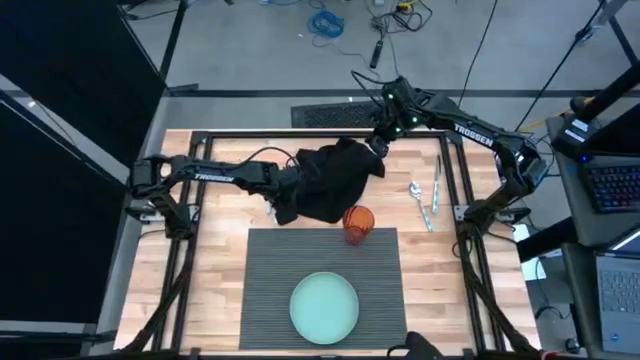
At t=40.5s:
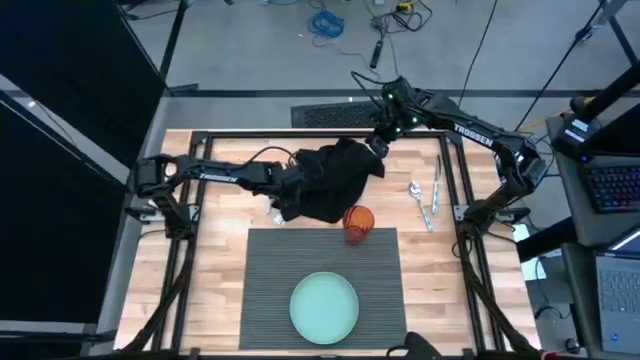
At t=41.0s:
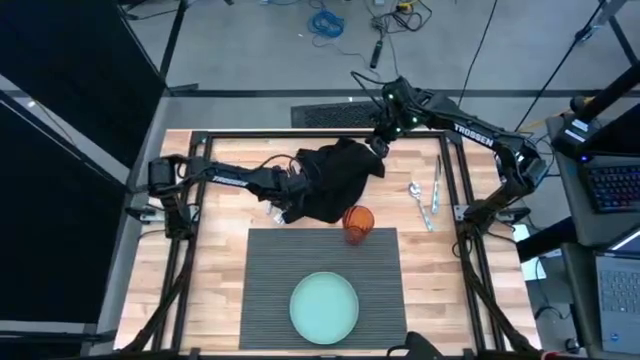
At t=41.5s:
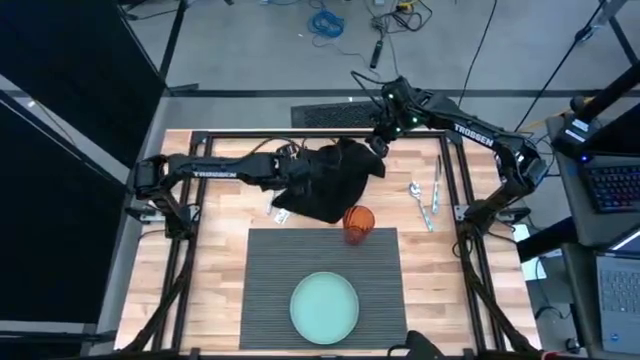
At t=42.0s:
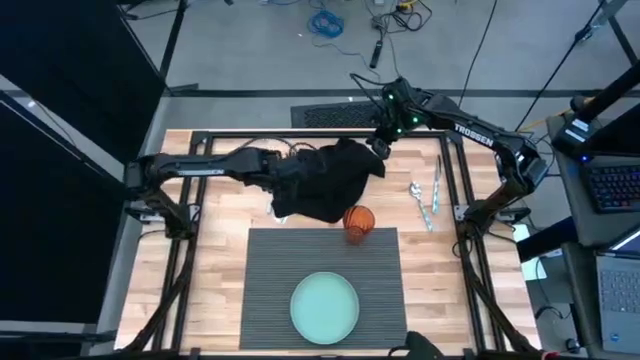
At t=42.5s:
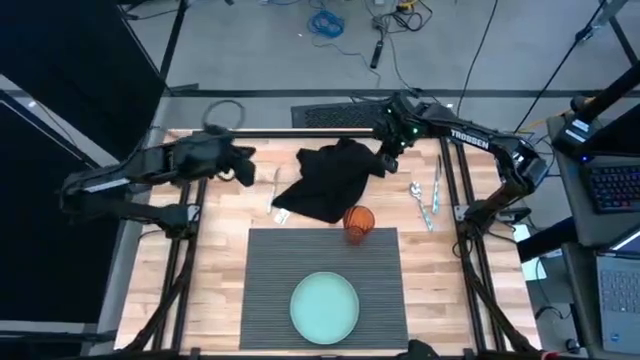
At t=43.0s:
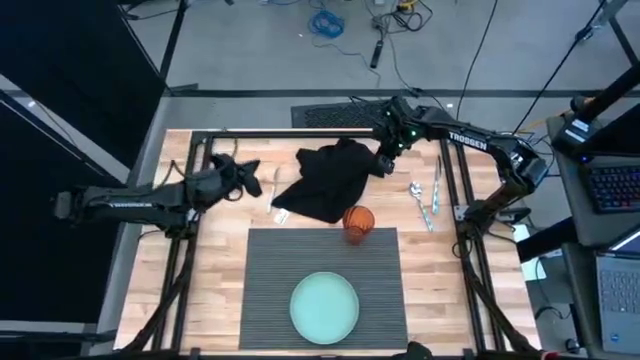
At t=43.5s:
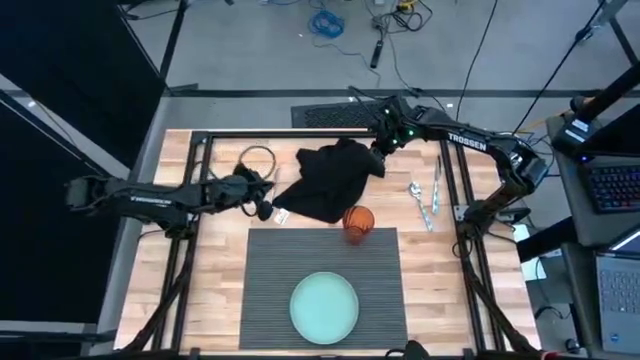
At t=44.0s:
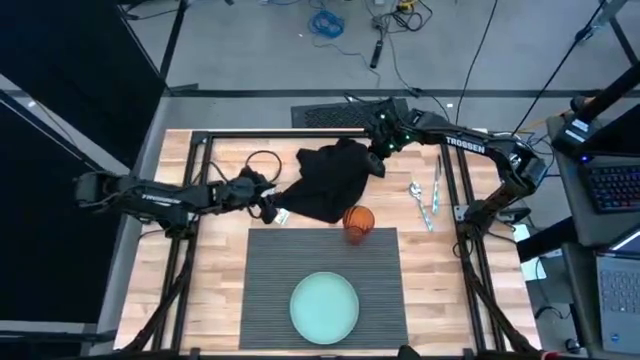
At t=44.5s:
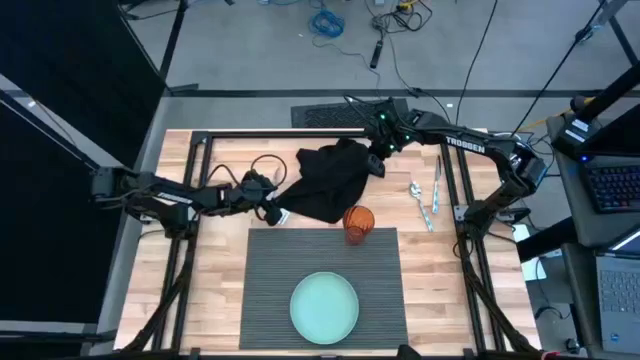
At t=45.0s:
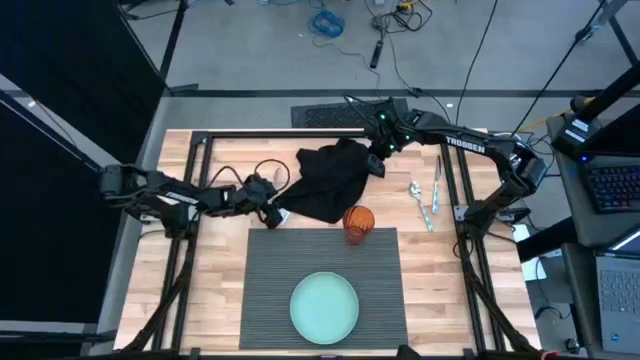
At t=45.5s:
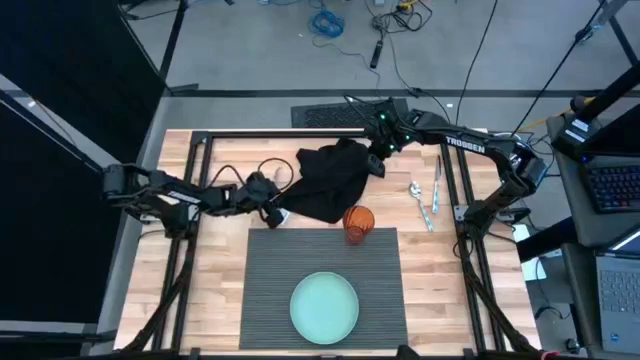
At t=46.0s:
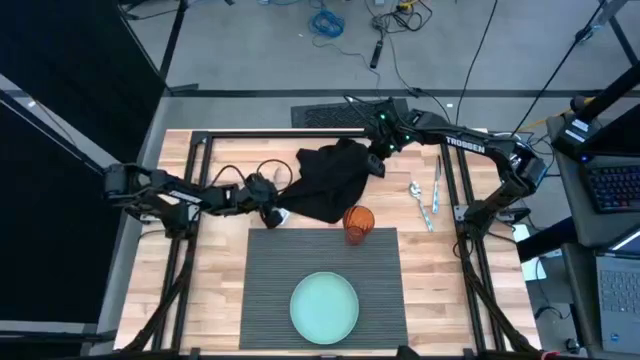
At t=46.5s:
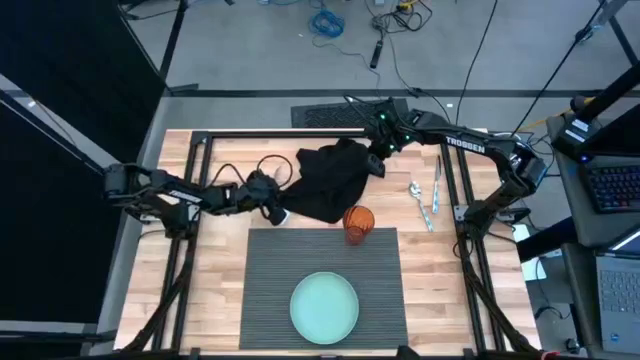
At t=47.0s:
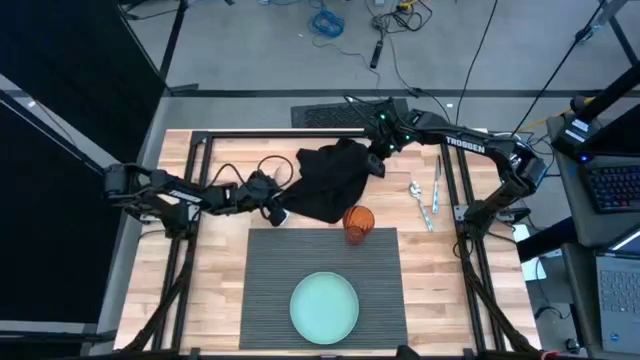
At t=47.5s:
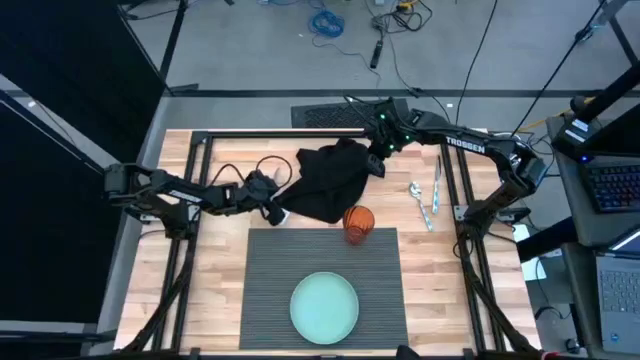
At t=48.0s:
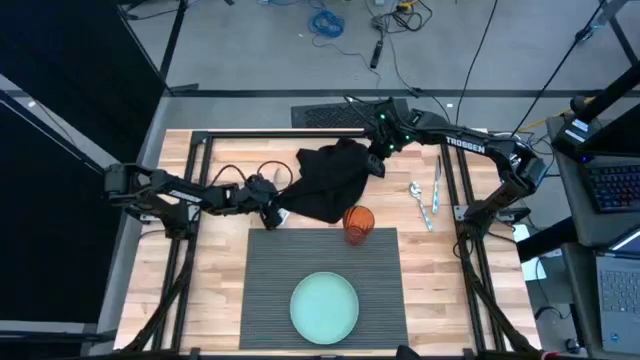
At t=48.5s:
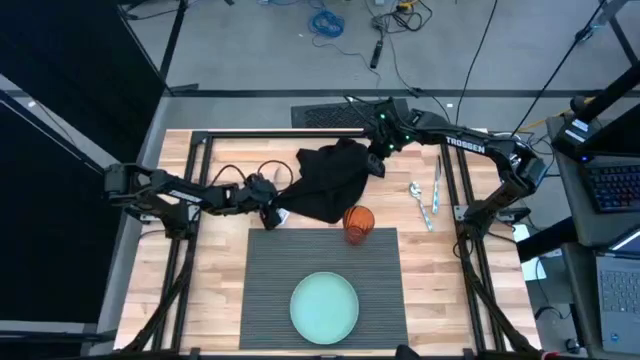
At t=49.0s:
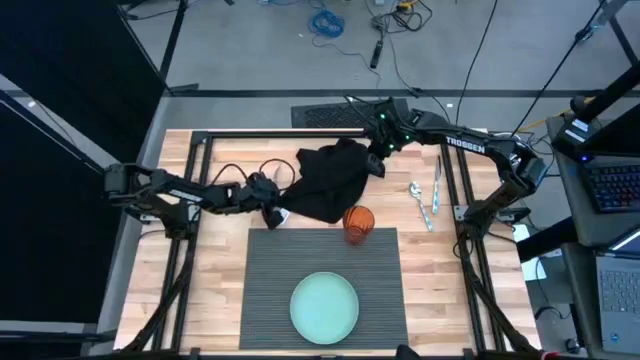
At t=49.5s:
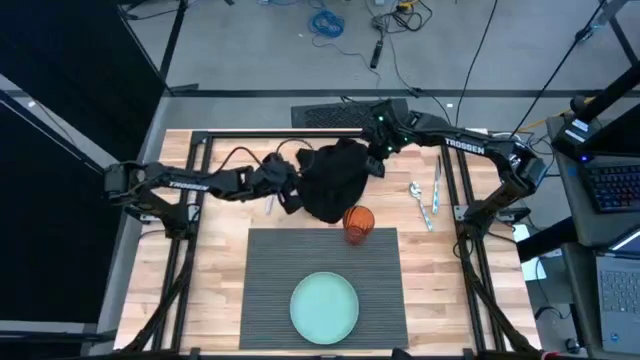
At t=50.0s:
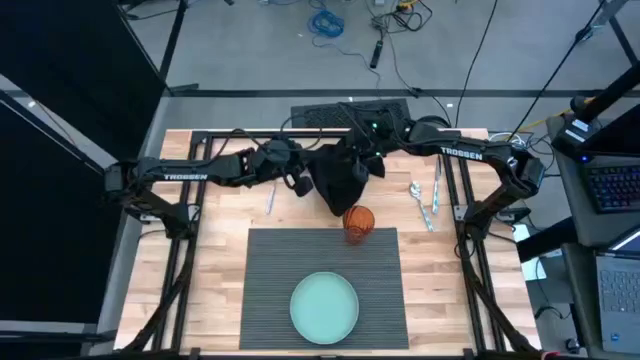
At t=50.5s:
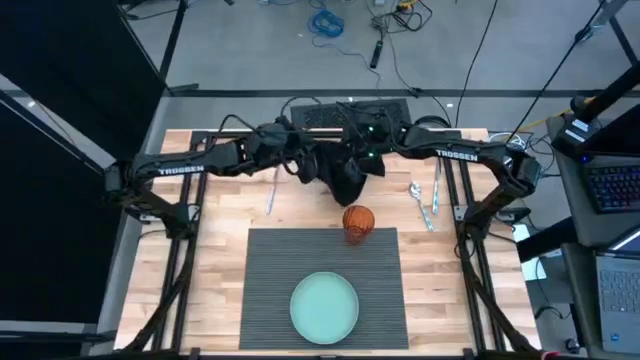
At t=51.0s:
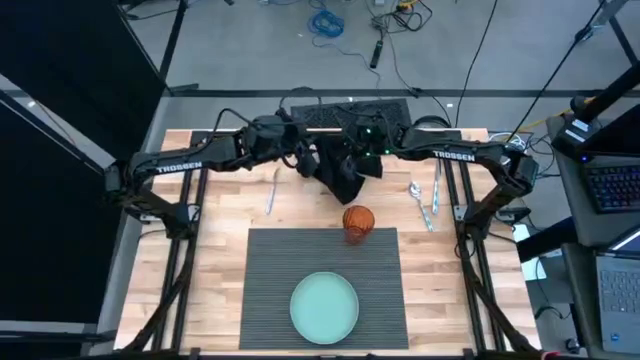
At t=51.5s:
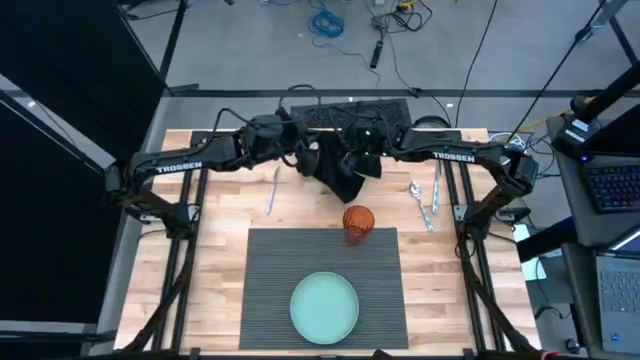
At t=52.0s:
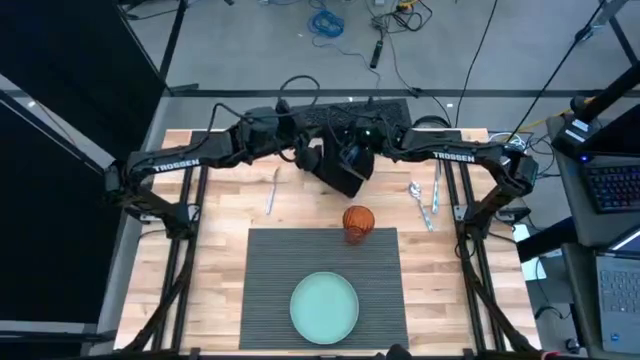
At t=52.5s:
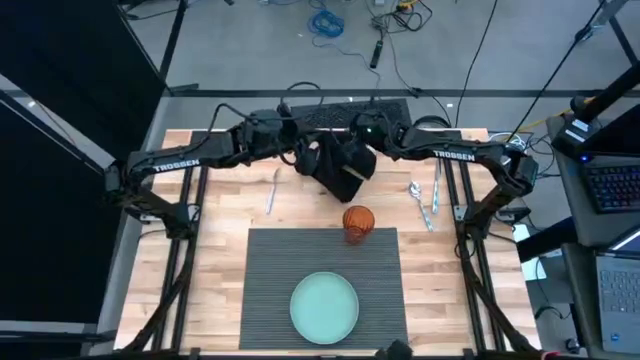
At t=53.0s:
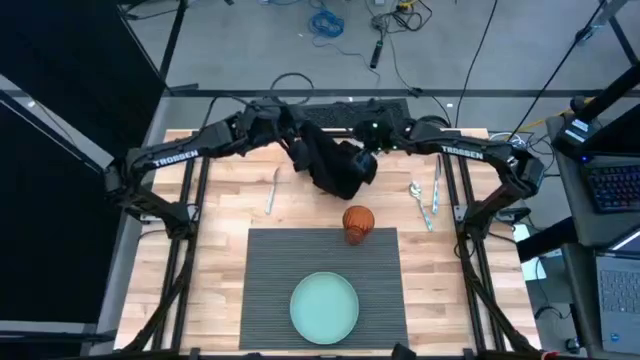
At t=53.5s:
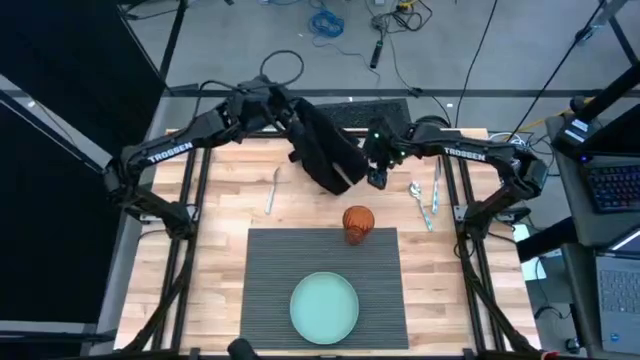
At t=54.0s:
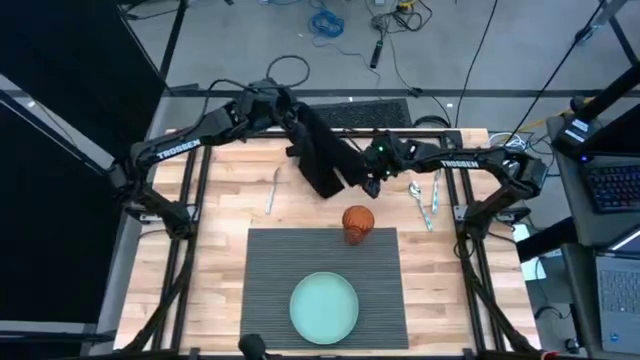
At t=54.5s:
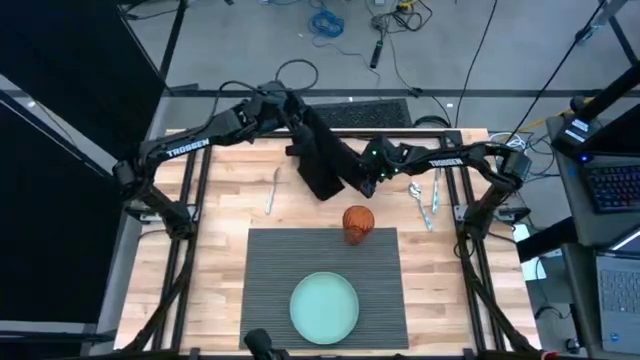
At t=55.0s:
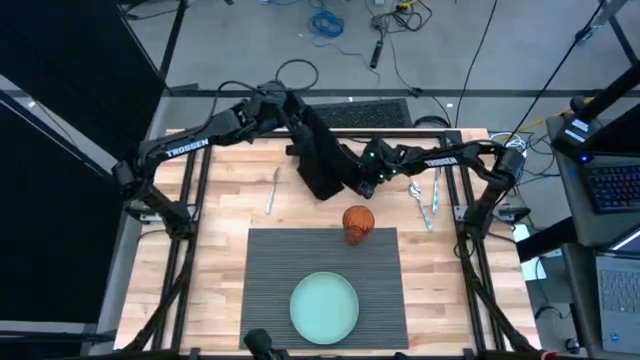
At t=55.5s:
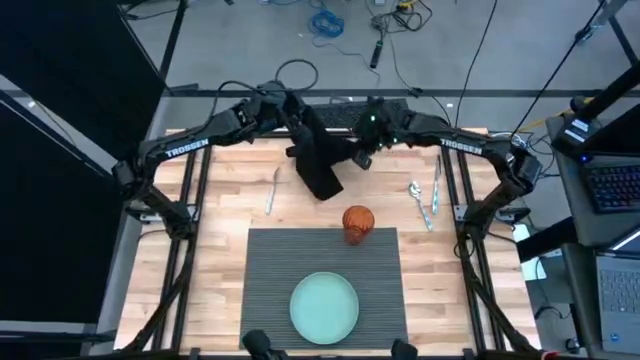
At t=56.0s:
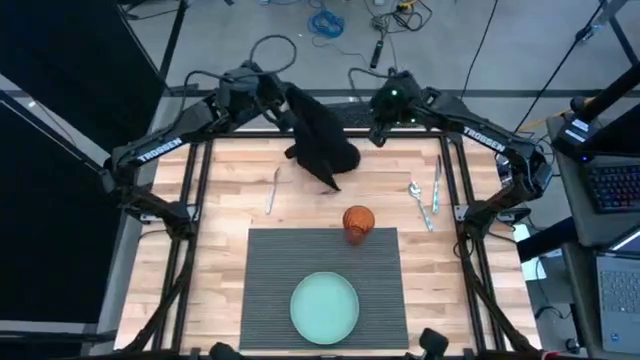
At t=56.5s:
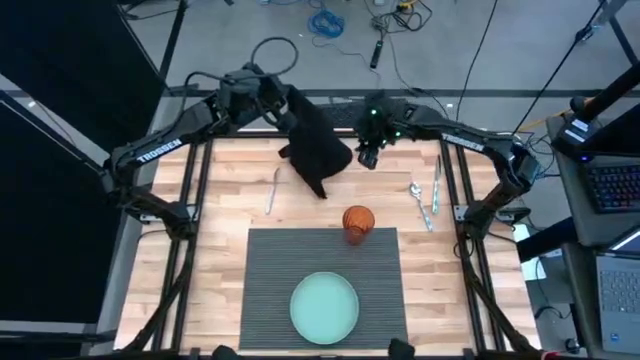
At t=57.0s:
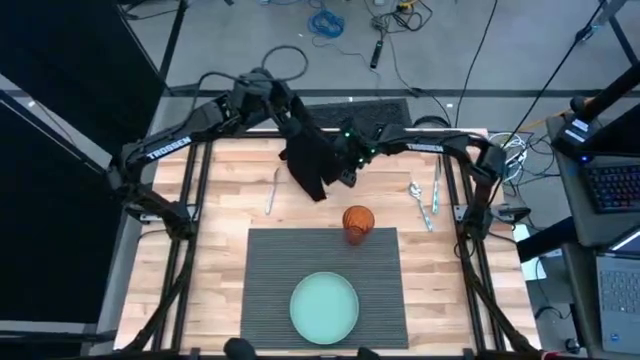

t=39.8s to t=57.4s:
Task: Set table place
Fold the black napkin

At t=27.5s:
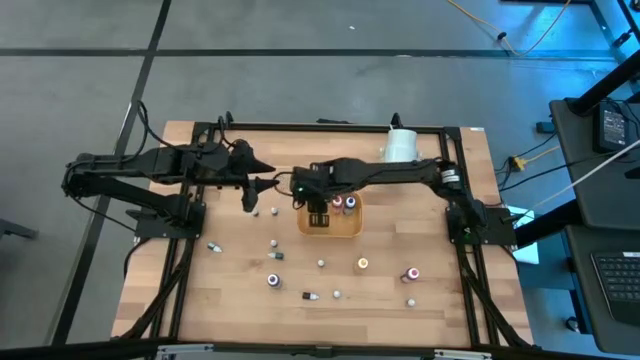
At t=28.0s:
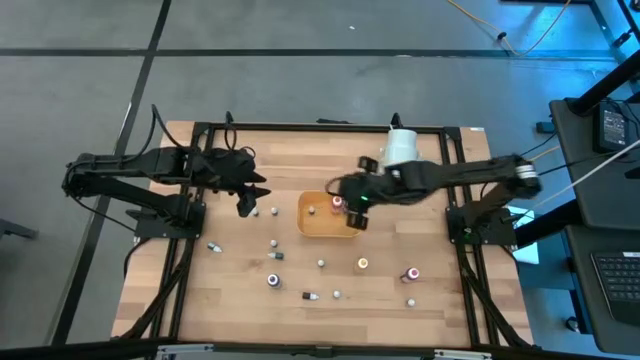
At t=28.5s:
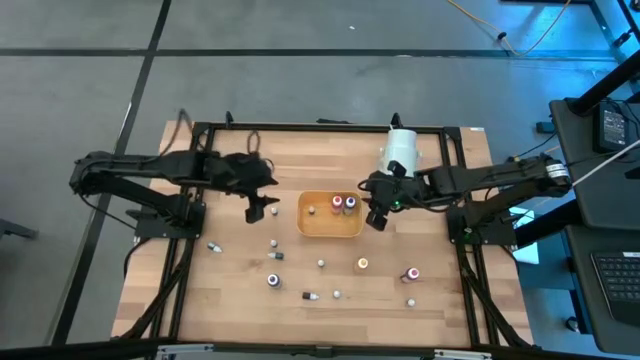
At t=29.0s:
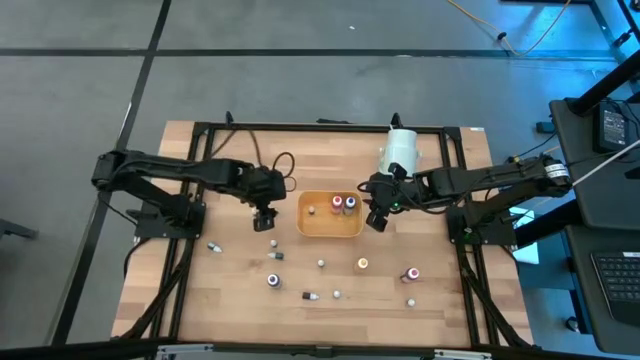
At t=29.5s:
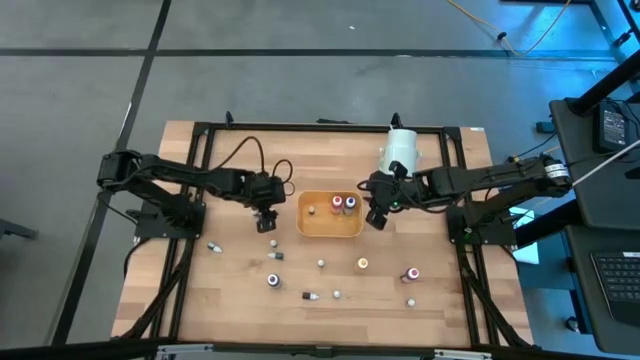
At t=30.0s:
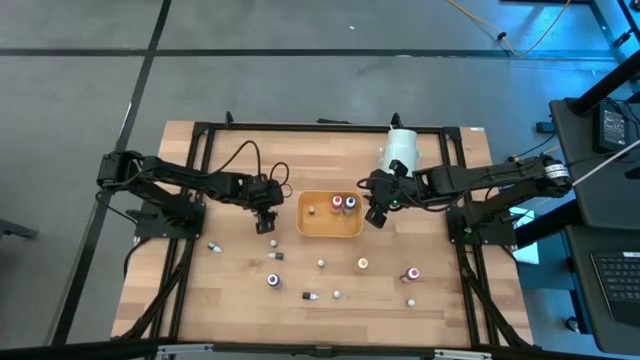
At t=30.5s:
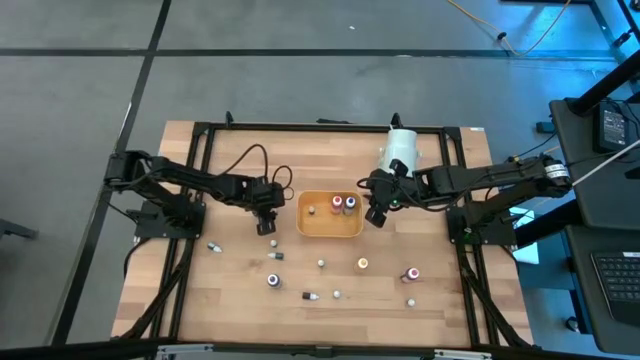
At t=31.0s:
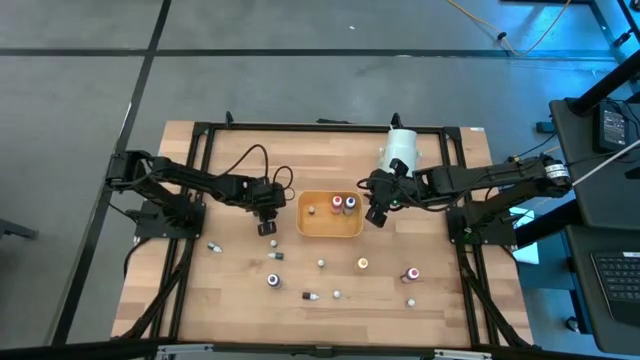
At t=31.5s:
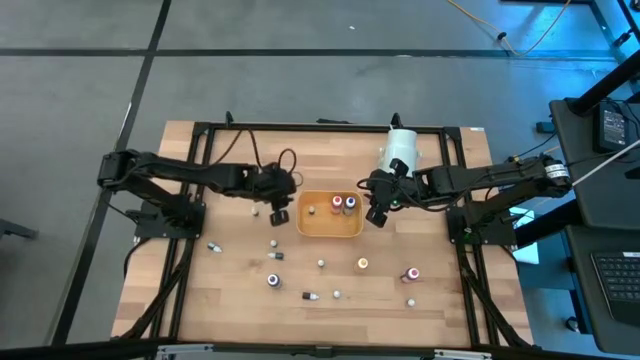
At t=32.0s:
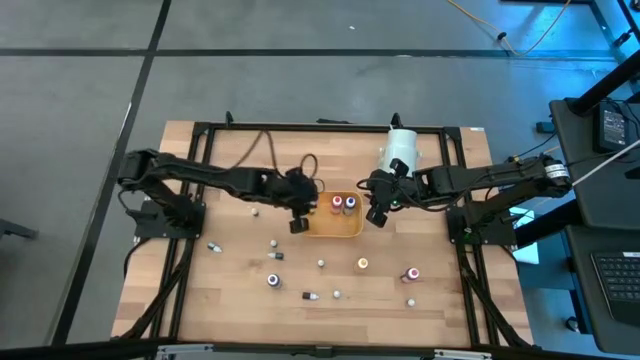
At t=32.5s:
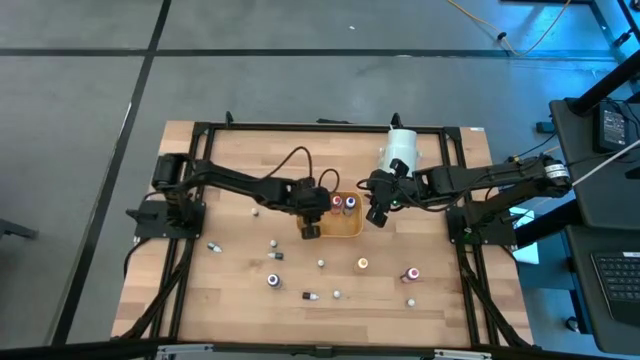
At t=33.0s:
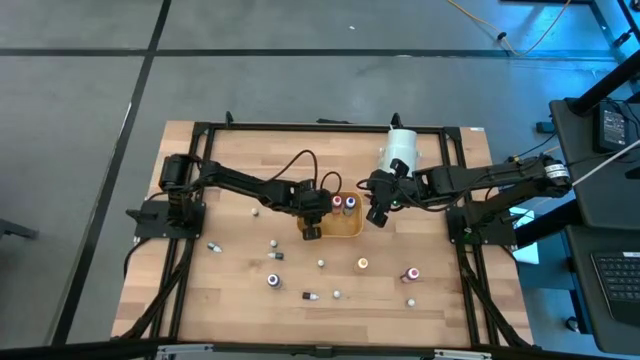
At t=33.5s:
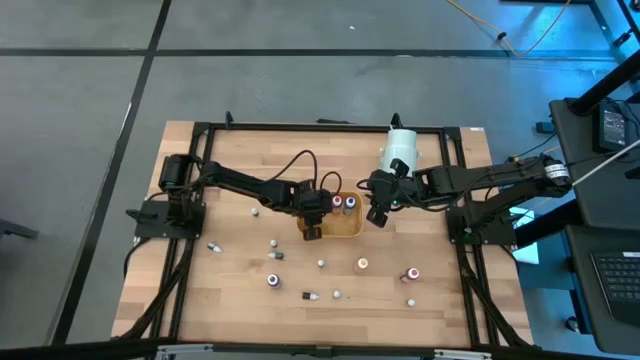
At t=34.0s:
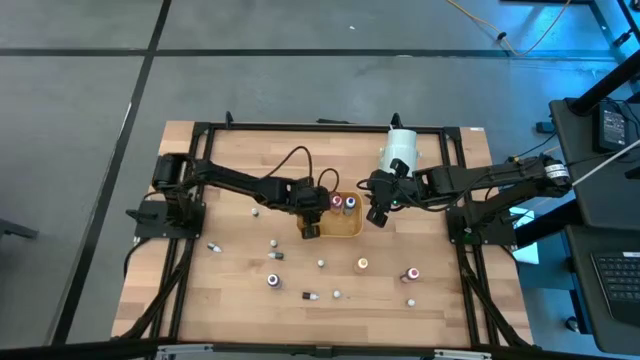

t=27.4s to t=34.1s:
Task: Pick & Place food coloring
Put the small purple food coloring bottle into the yellow bin
